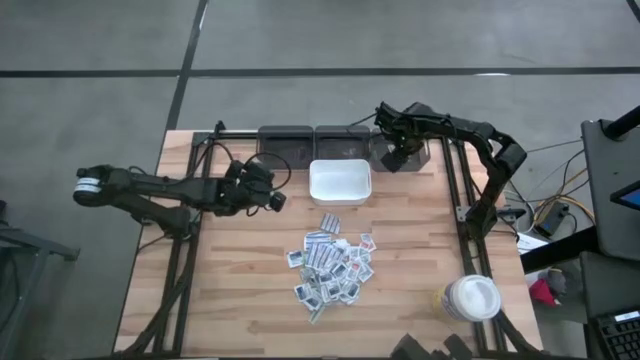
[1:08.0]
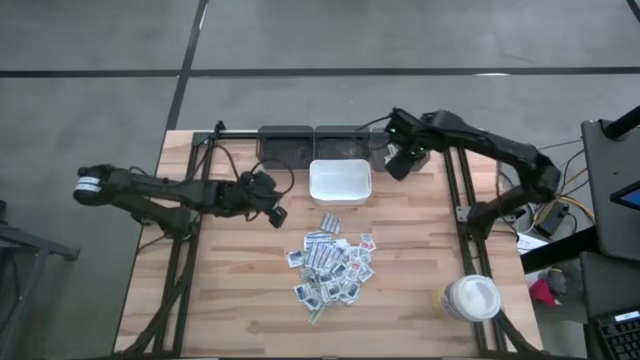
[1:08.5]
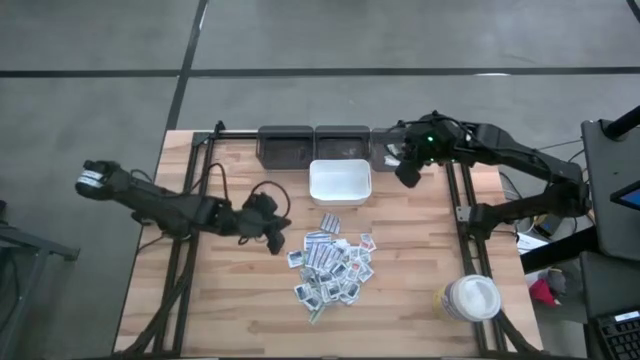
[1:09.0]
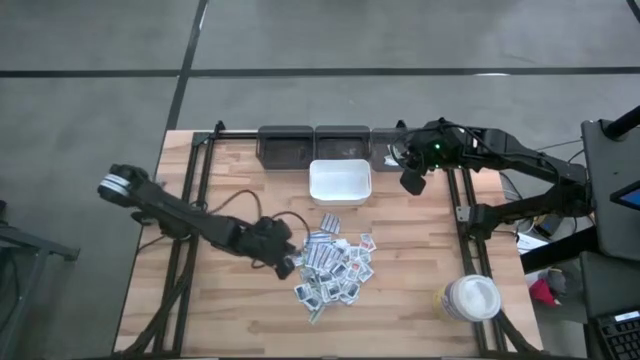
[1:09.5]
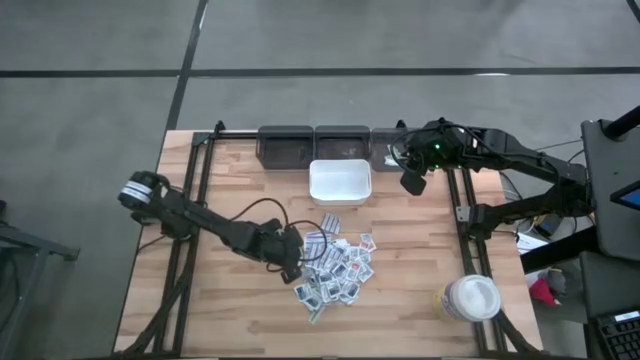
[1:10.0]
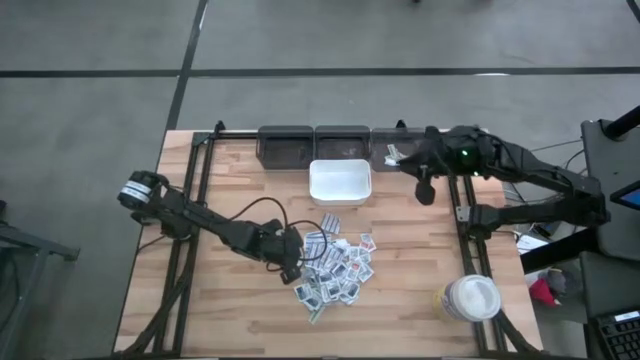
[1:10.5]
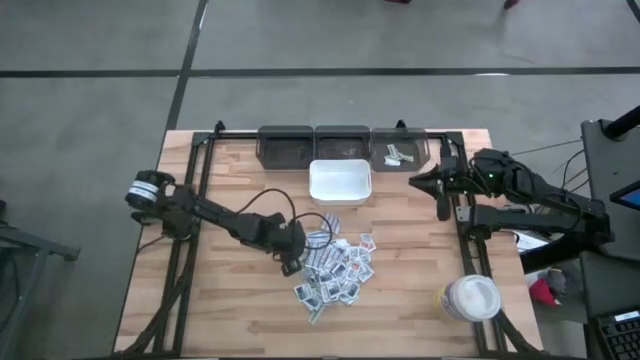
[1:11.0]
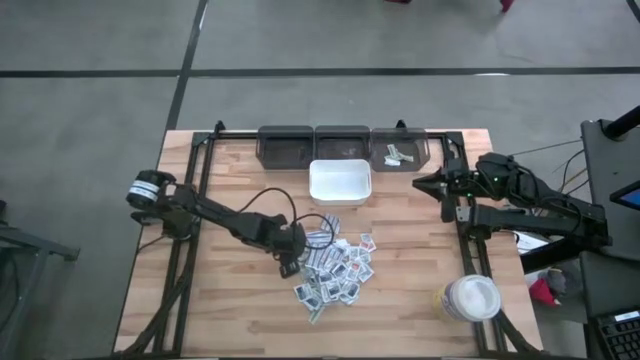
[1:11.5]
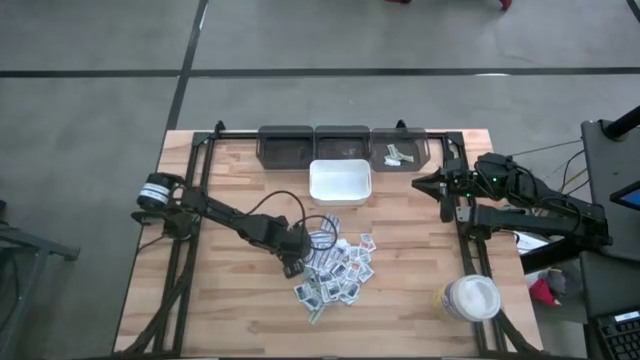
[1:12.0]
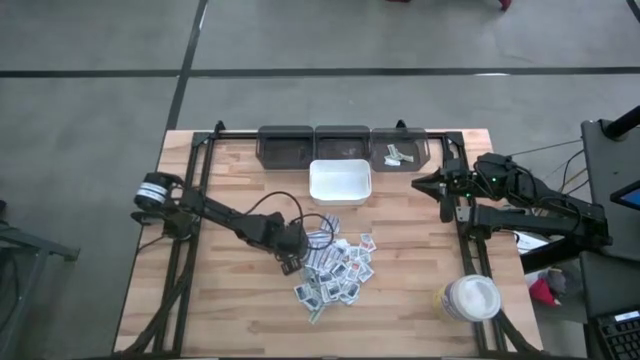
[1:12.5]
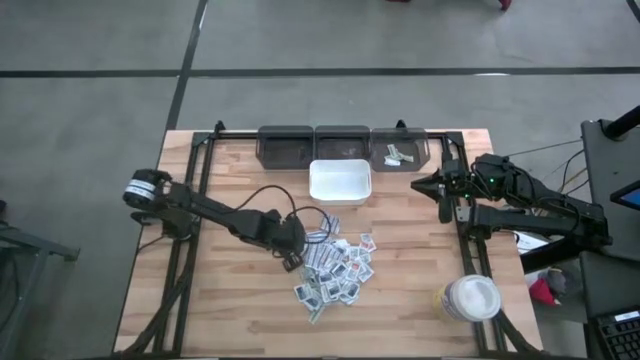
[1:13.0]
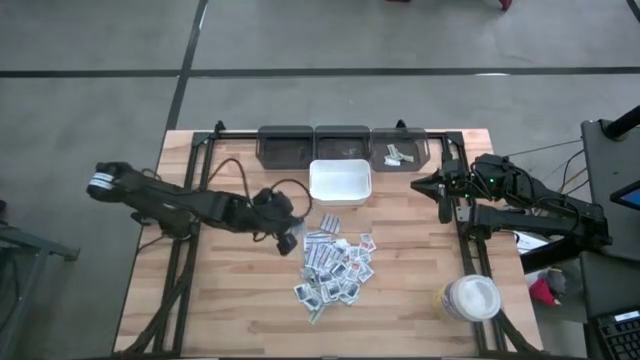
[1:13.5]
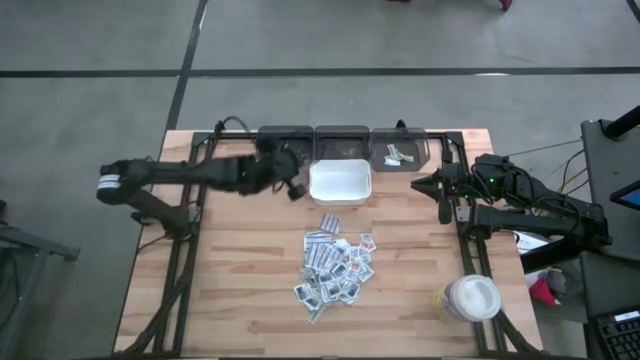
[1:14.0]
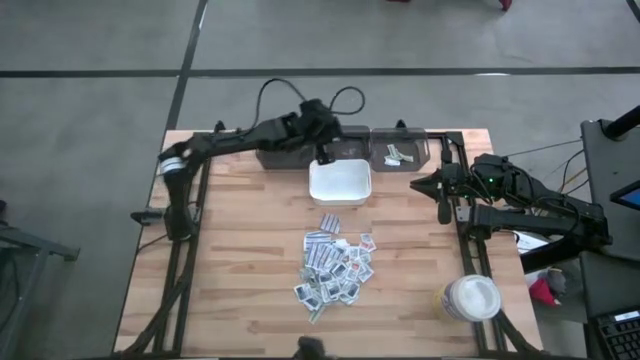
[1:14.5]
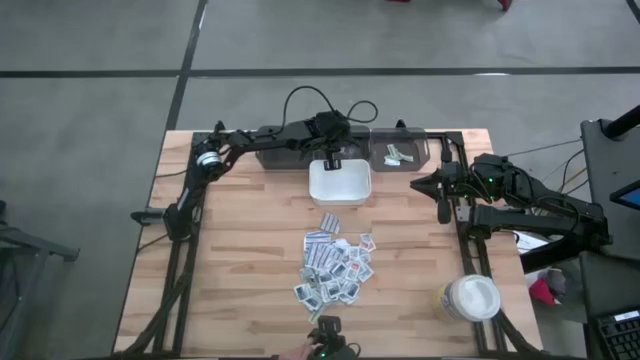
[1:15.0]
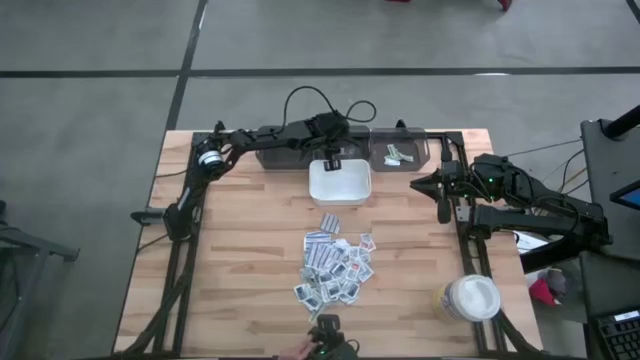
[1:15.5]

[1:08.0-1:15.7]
Task: Pick & Place First Aid Supplies
Put the blue alcohol pad into the middle gray bin

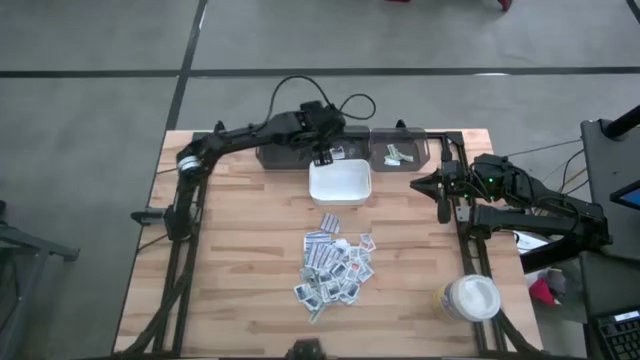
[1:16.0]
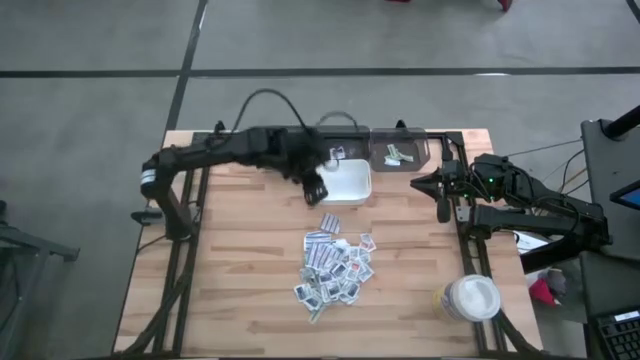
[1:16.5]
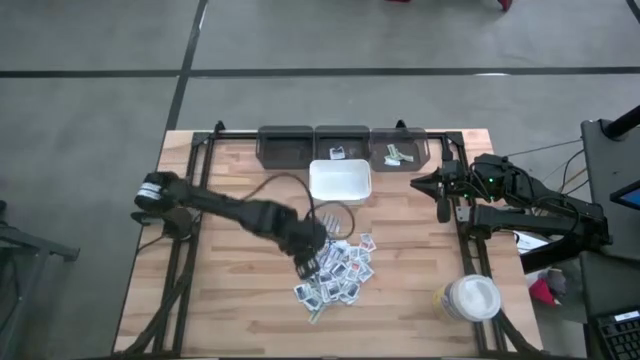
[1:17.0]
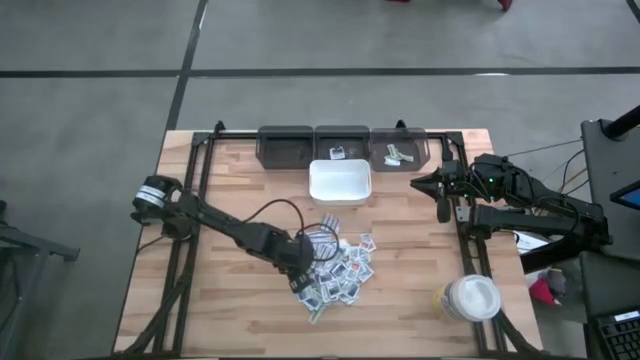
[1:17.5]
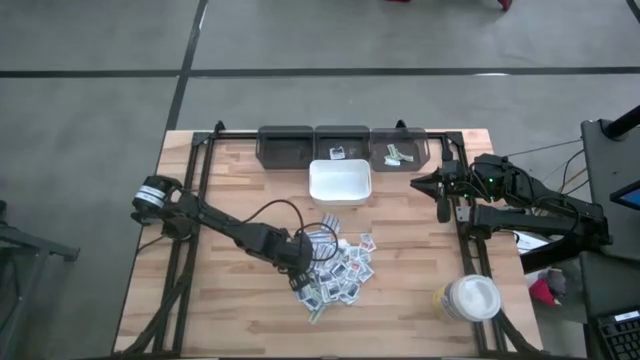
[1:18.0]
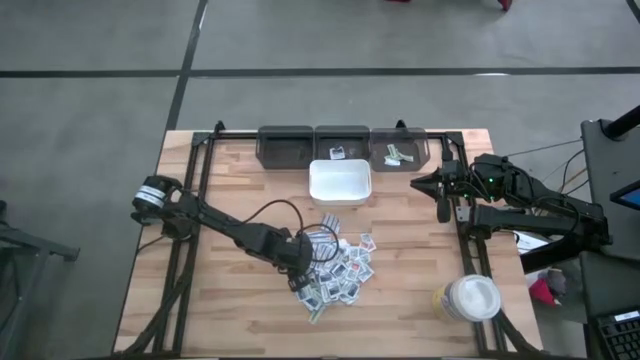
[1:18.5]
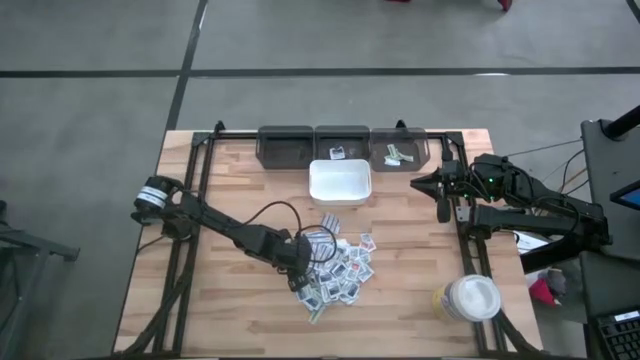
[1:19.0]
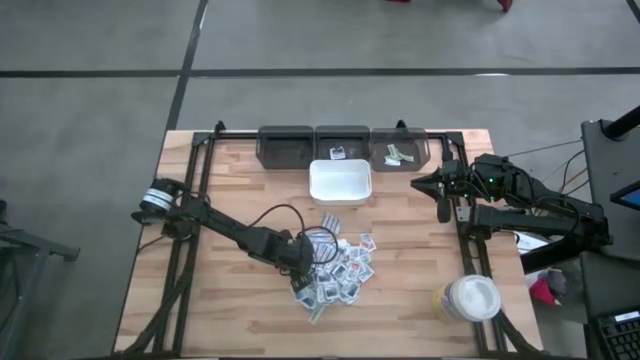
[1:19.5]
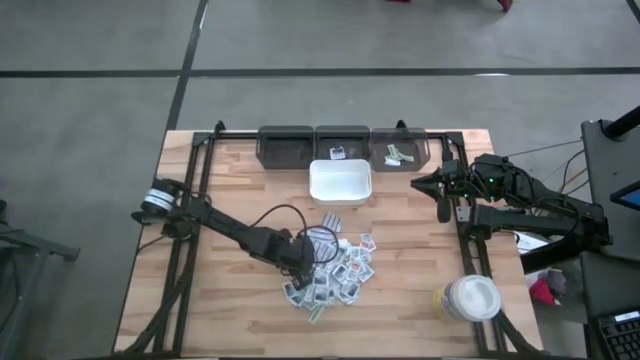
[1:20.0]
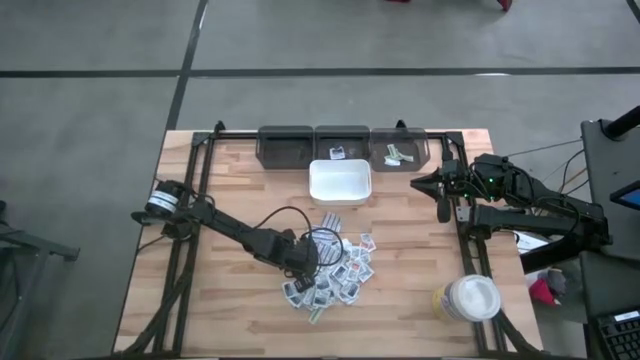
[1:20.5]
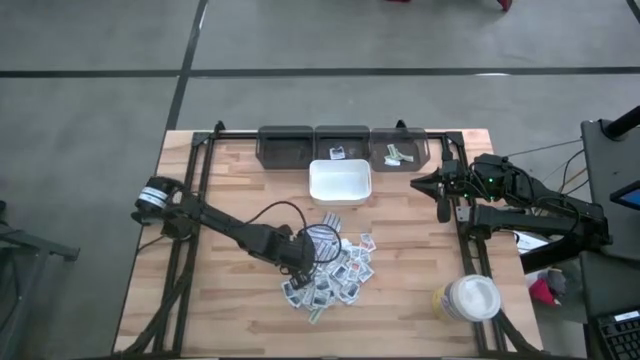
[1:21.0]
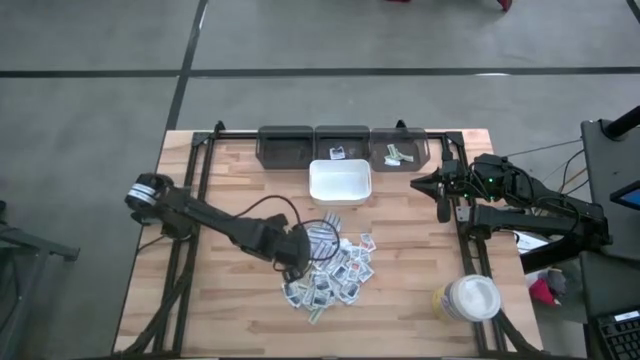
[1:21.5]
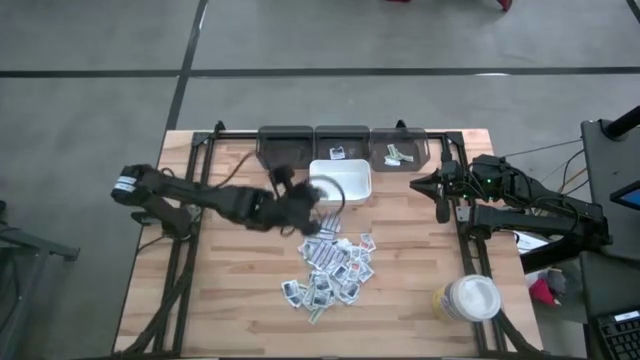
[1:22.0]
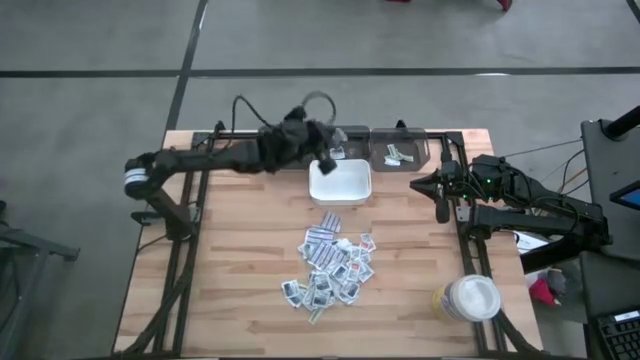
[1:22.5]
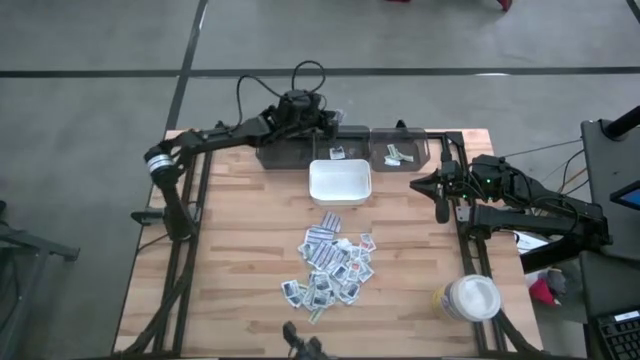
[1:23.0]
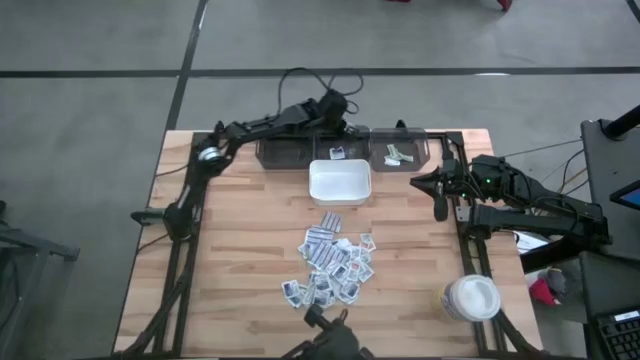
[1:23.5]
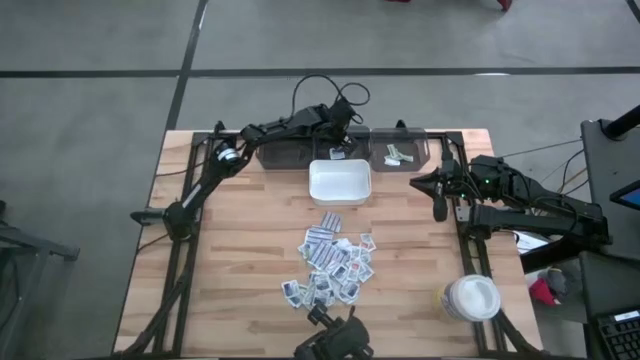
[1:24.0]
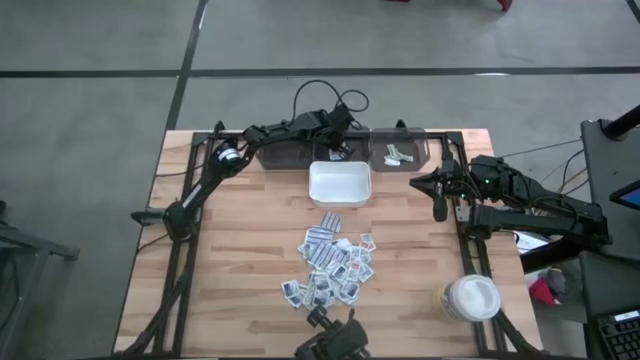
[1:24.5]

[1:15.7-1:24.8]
Put the blue alcohol pad into the middle gray bin

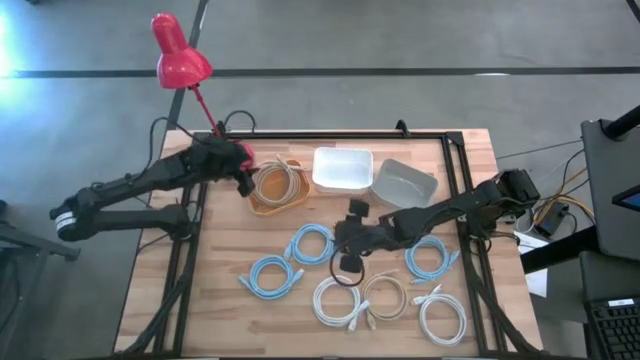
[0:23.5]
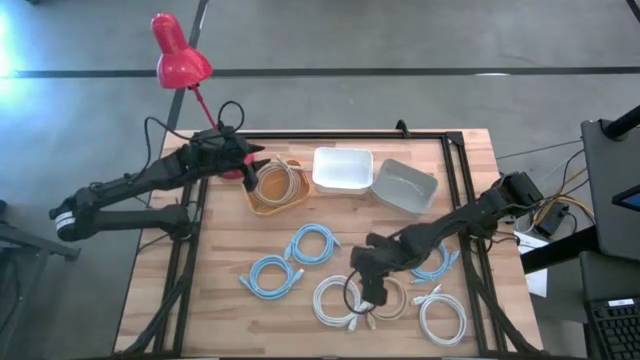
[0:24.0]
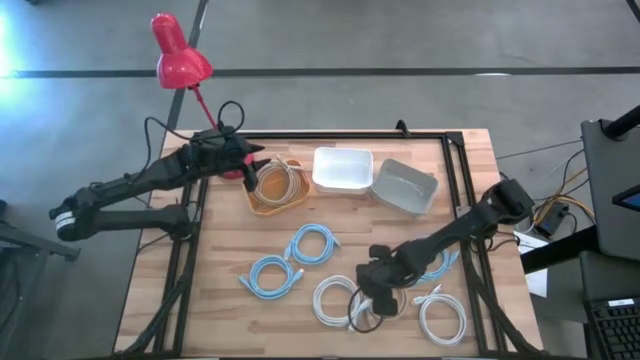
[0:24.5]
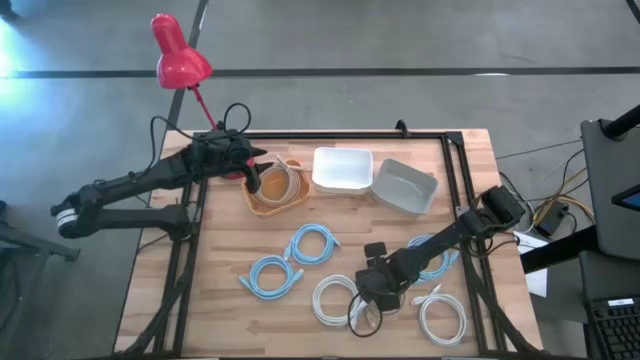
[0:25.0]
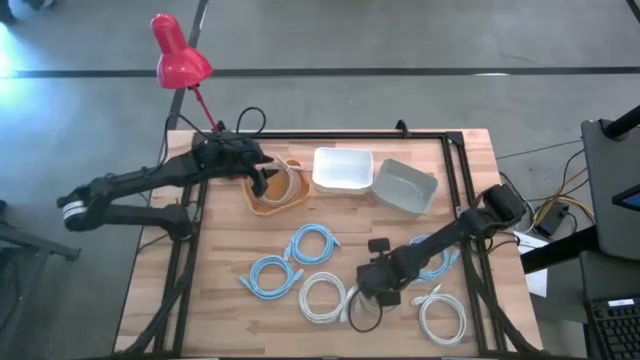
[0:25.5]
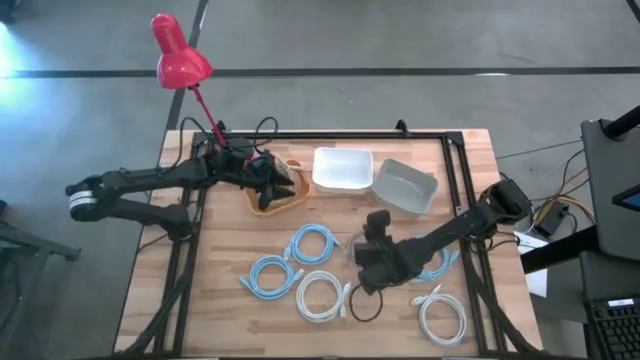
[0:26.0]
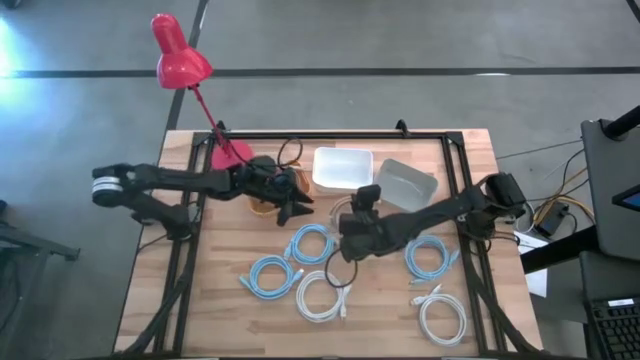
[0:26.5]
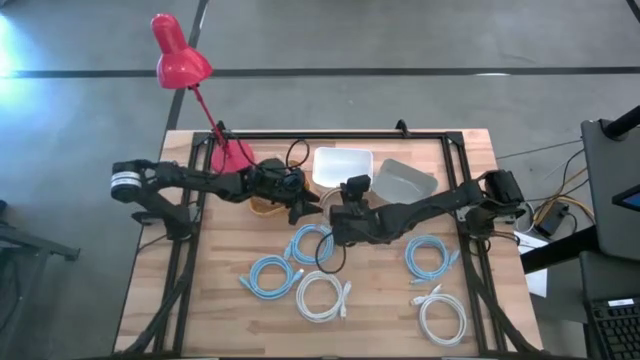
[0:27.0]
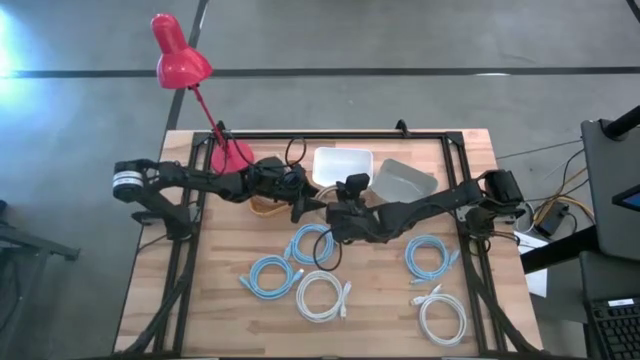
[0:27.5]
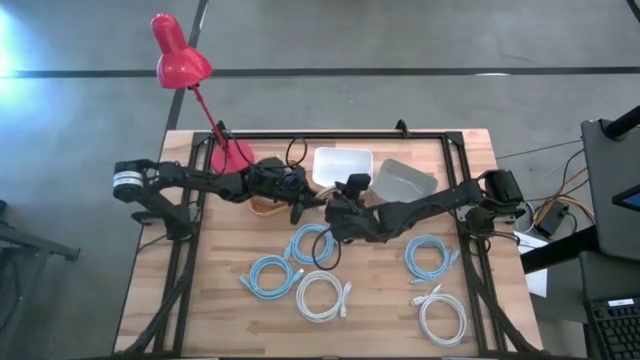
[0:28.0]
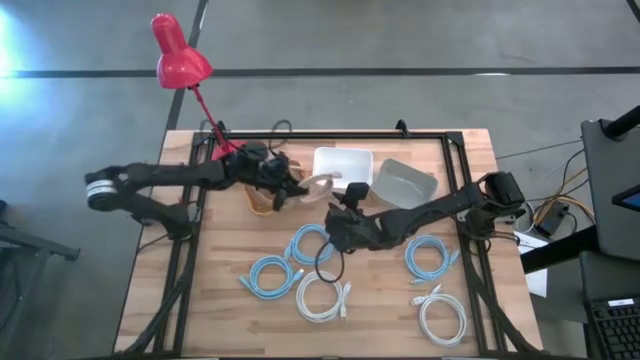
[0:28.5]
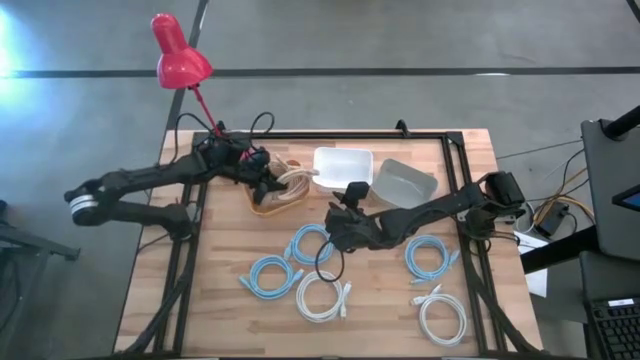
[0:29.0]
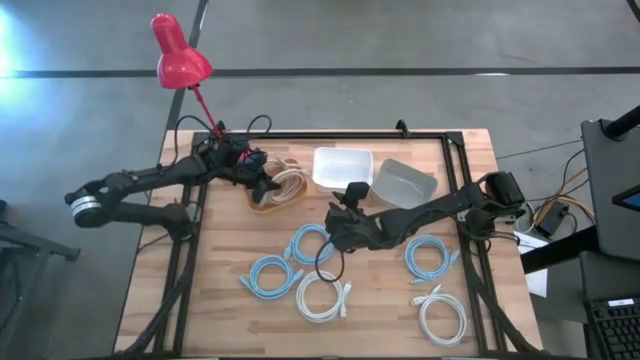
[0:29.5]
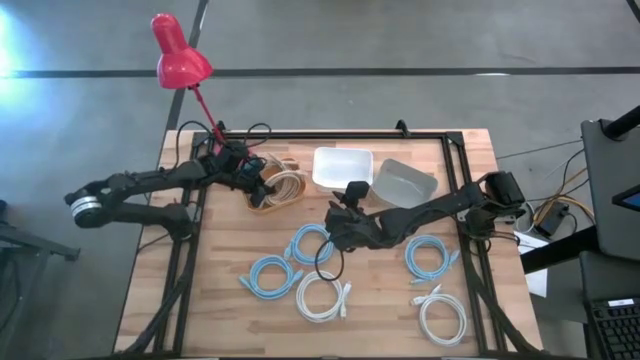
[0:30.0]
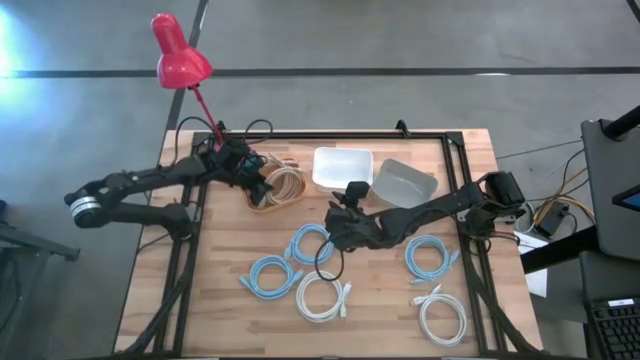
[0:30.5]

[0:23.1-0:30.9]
Task: Pick & Place USB Port
Put the brown usb cable into the yellow bin
